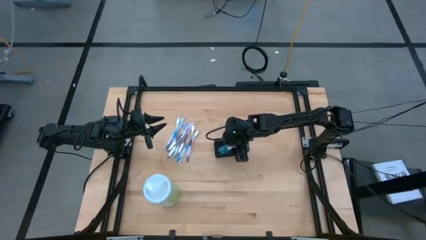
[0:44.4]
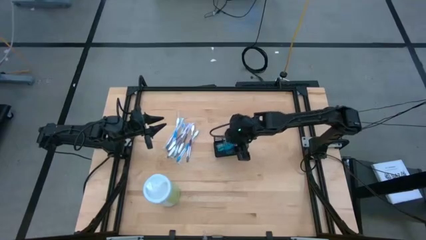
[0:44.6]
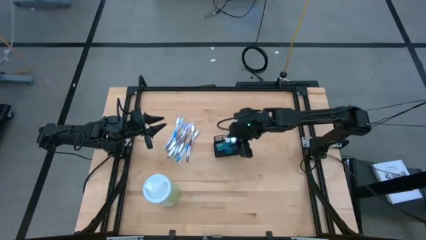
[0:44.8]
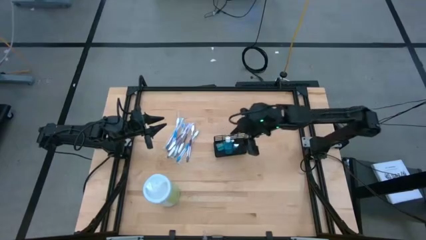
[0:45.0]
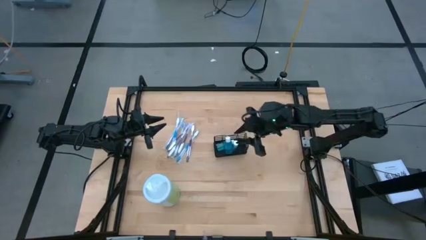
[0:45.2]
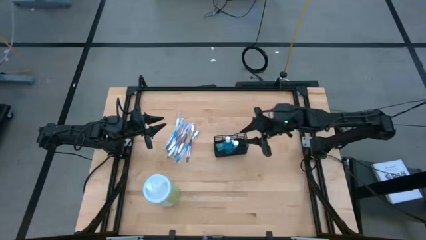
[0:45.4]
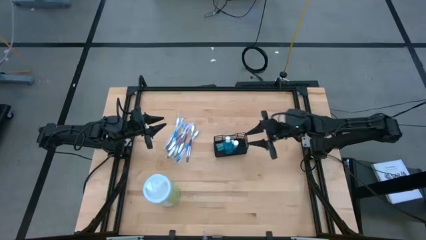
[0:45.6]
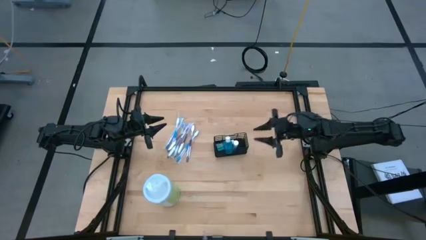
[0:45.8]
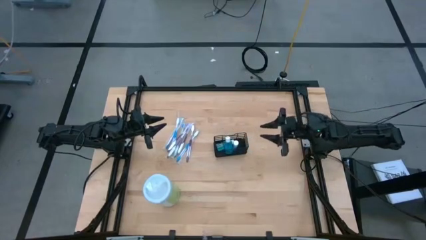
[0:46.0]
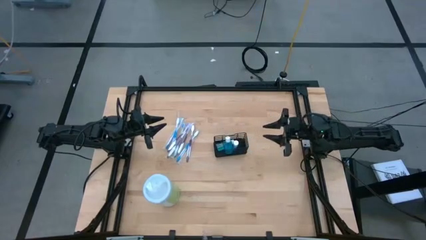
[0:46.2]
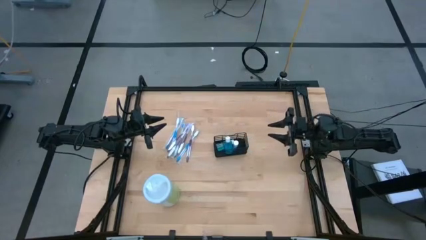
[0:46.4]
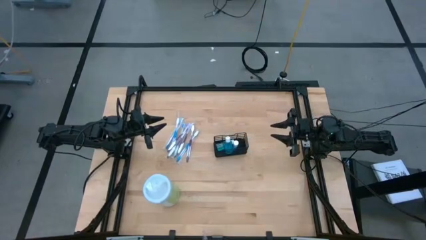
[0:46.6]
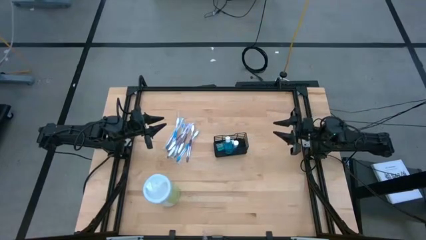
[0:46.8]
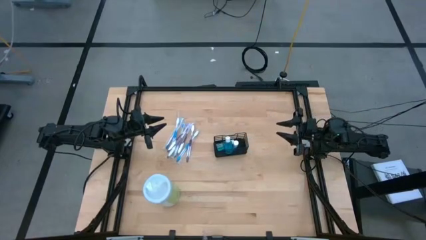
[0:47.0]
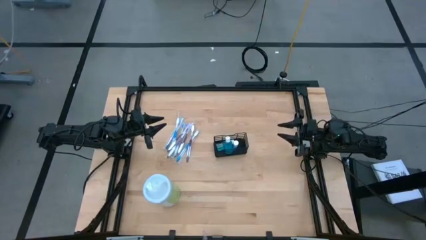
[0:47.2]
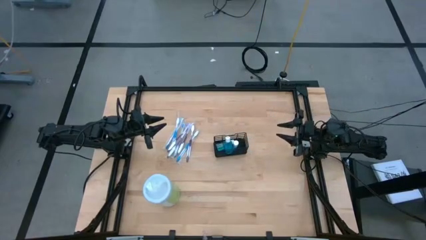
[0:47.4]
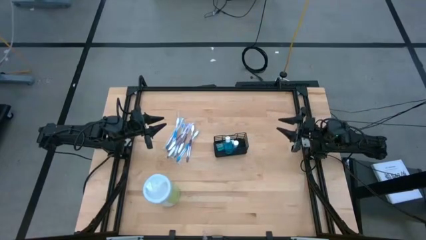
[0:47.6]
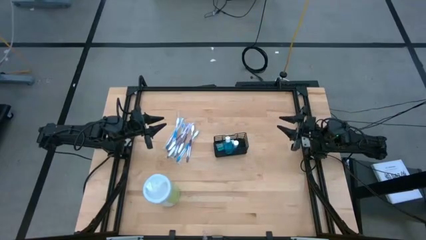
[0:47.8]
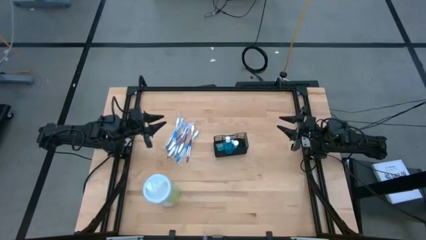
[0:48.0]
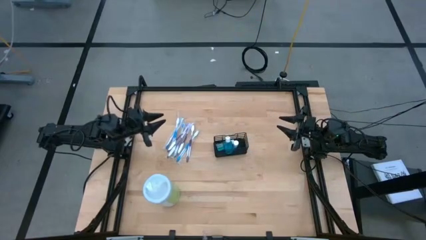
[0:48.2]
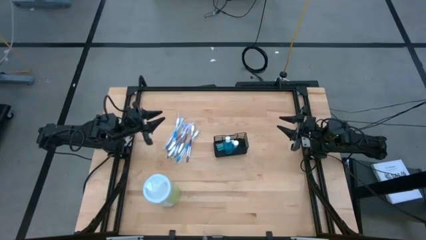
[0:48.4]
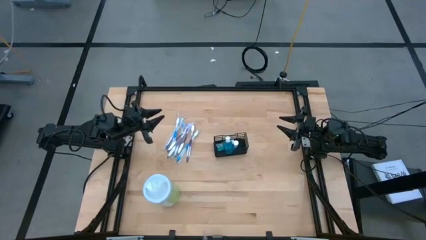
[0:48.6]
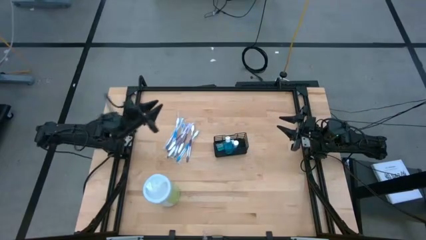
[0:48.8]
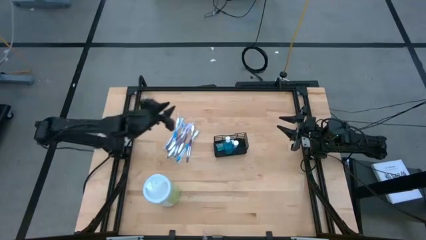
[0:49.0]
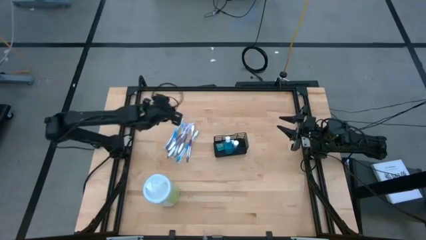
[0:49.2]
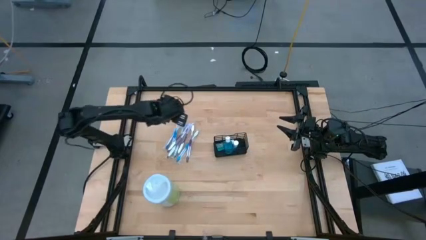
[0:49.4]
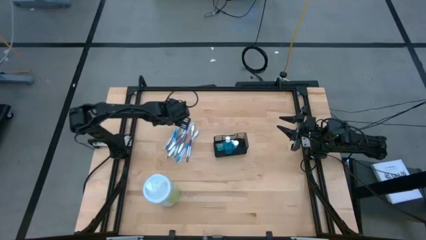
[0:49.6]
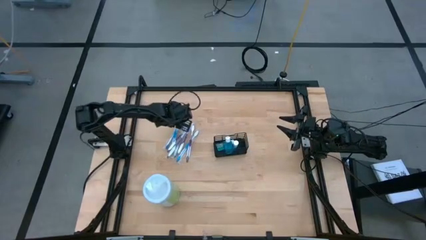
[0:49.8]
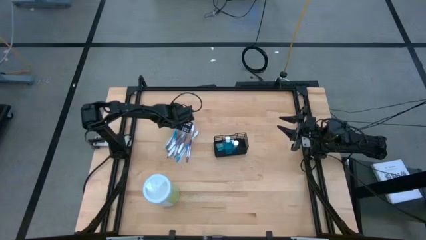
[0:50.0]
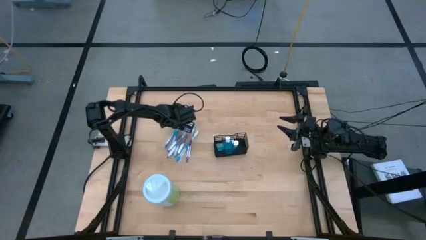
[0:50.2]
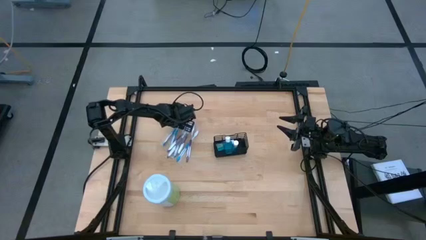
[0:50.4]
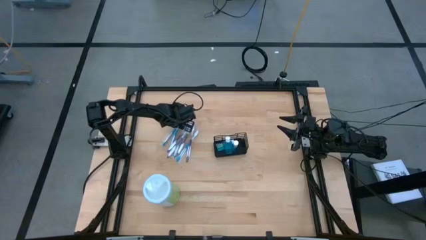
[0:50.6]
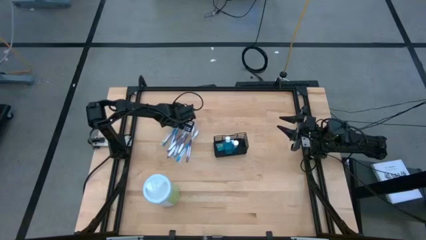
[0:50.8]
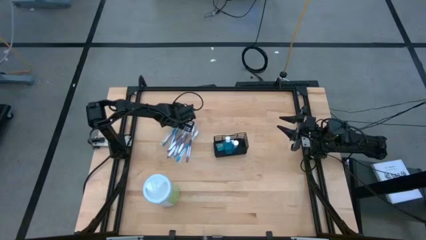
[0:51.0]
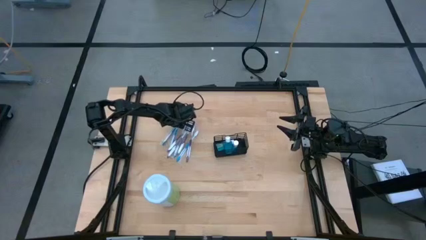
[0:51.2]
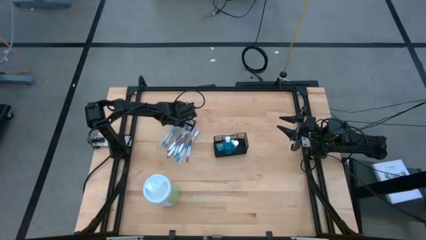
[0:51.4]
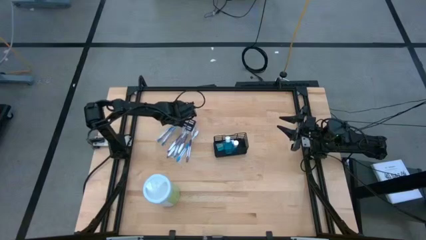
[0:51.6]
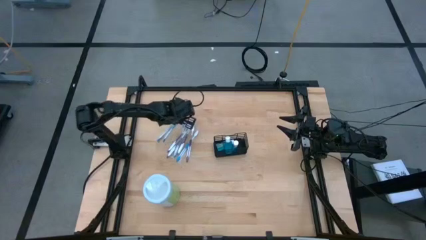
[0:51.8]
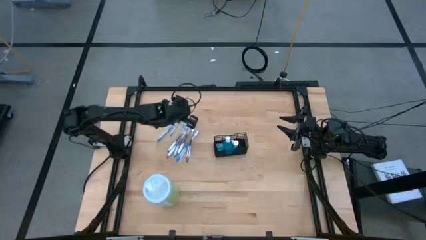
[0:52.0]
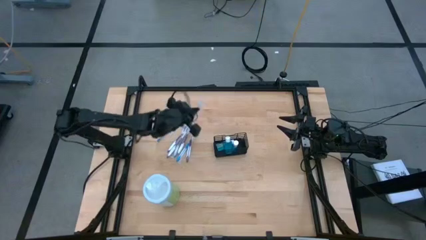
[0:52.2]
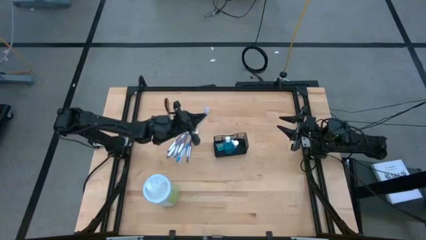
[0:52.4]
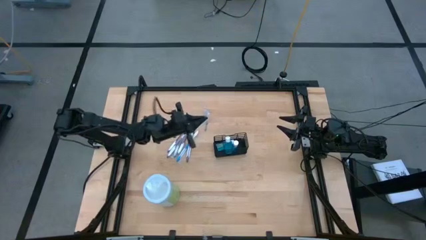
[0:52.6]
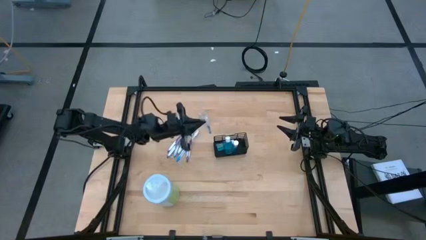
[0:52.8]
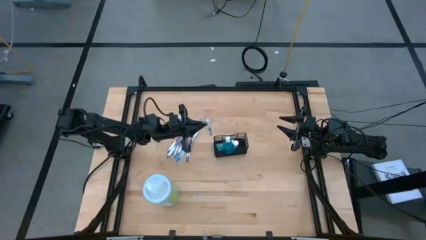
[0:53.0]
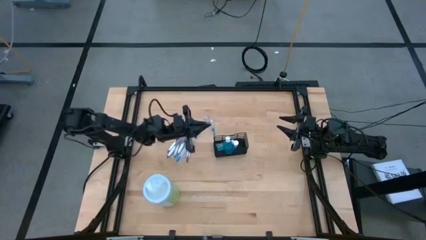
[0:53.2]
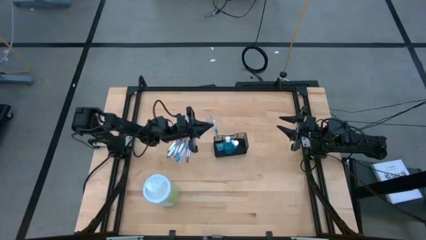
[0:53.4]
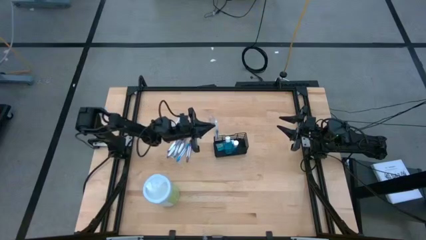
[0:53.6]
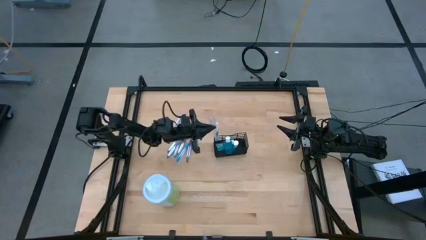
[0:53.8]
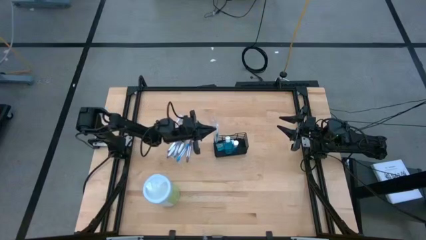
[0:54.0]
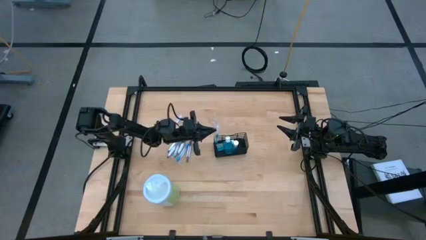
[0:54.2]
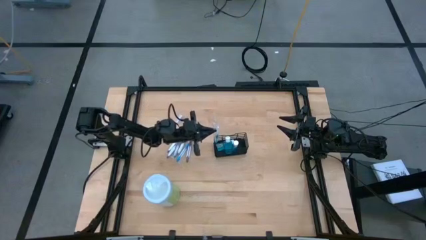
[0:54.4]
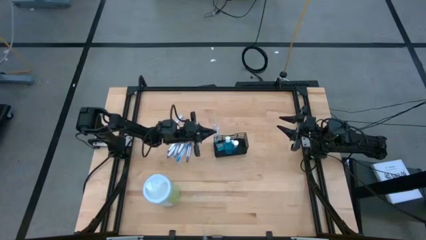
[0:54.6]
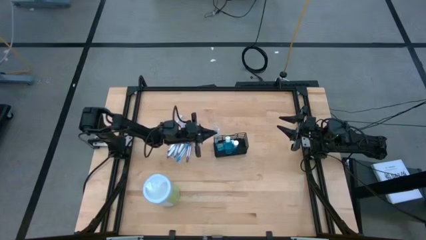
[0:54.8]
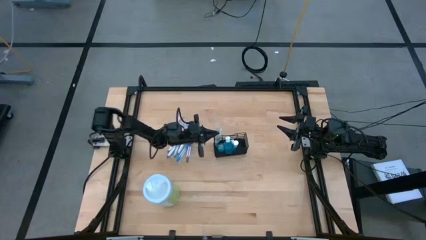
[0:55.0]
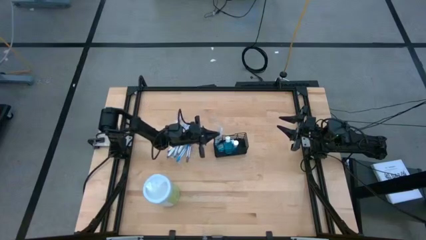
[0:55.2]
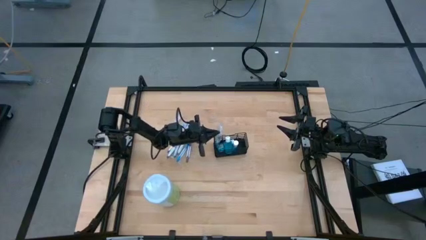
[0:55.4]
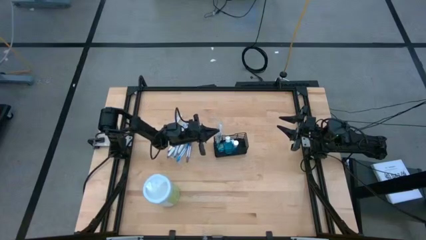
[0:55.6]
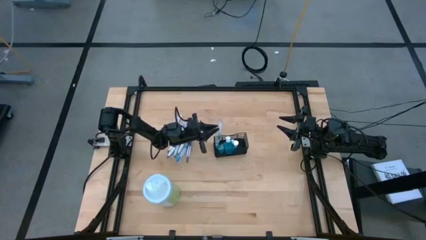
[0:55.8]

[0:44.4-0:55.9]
Task: Pick & Place toothbrushing station
Put the blue toothbrush into the black mesh organizer

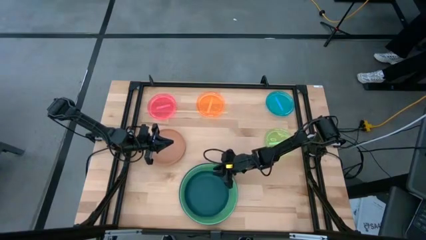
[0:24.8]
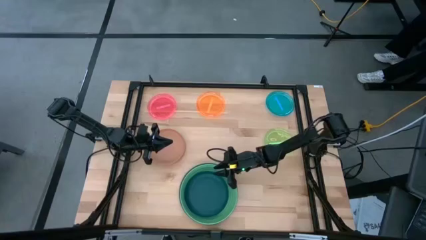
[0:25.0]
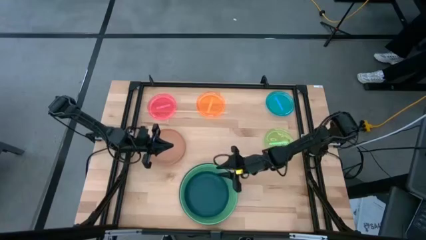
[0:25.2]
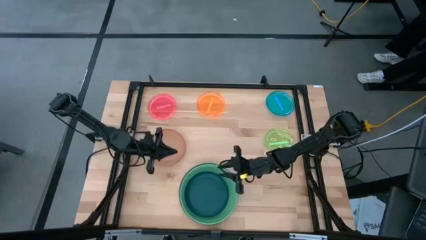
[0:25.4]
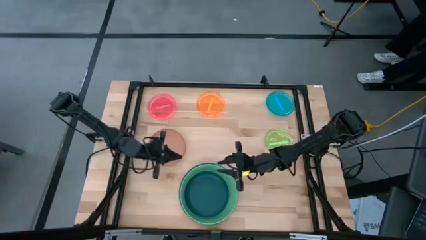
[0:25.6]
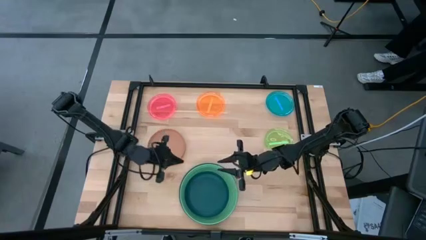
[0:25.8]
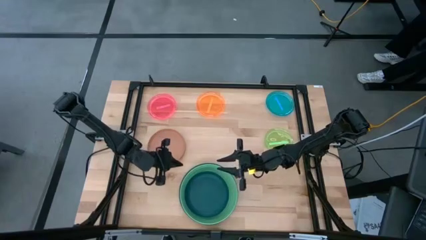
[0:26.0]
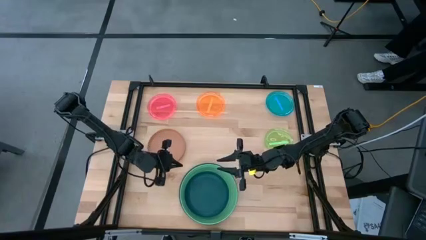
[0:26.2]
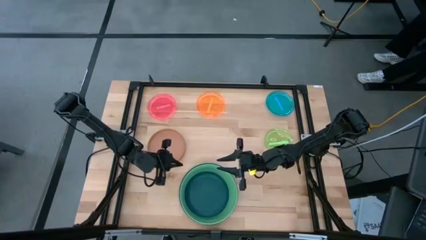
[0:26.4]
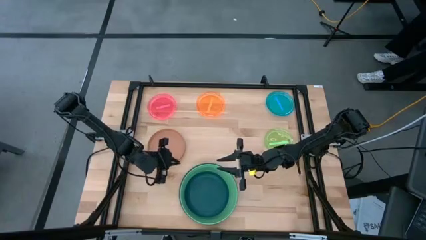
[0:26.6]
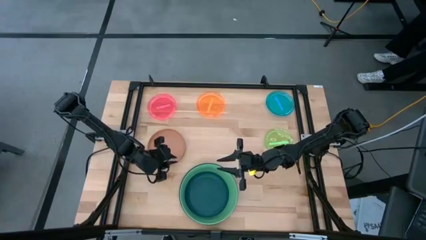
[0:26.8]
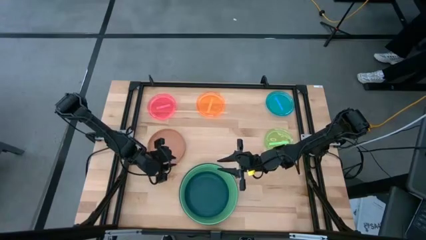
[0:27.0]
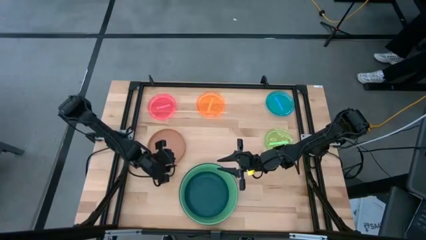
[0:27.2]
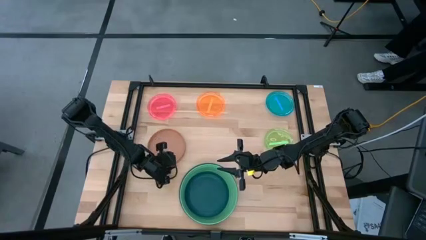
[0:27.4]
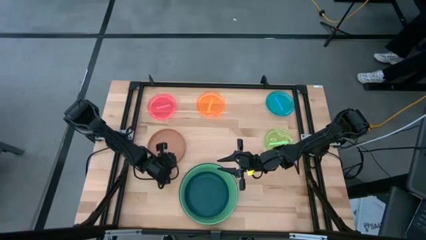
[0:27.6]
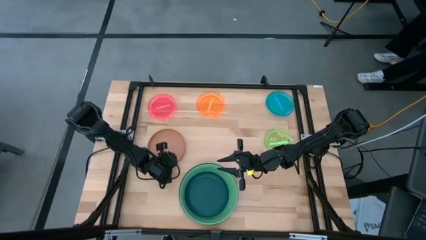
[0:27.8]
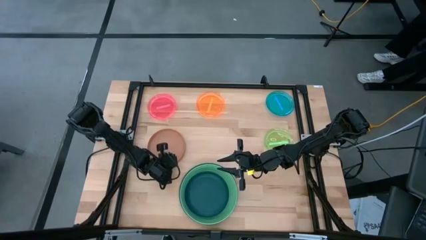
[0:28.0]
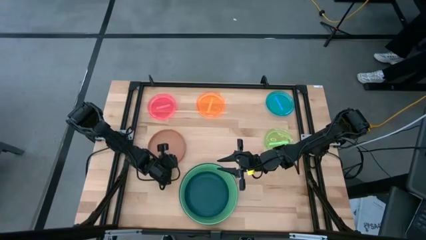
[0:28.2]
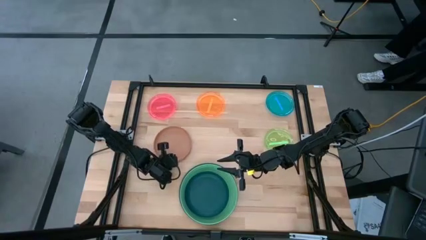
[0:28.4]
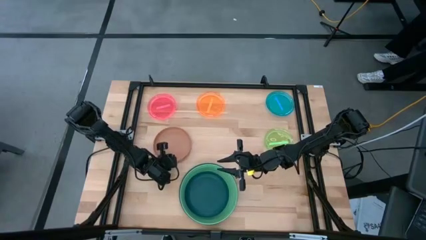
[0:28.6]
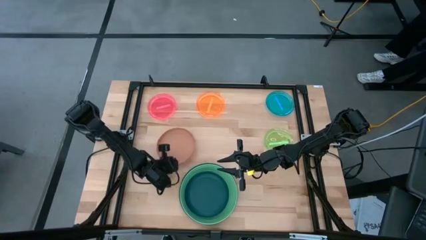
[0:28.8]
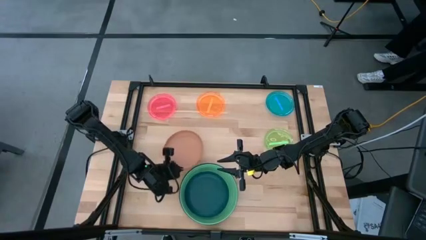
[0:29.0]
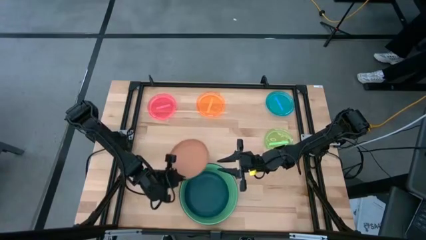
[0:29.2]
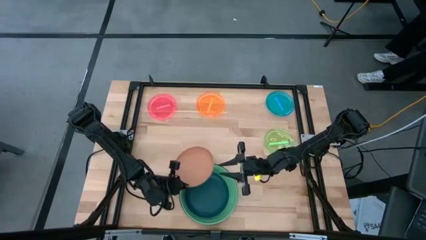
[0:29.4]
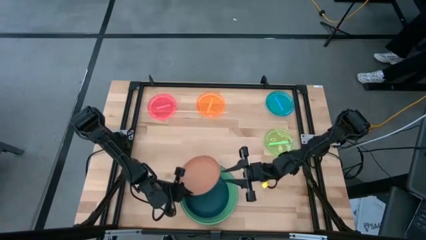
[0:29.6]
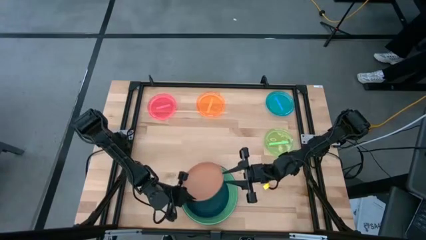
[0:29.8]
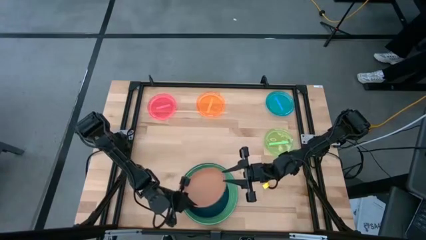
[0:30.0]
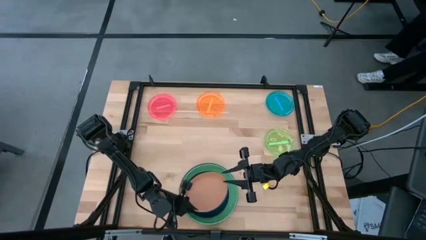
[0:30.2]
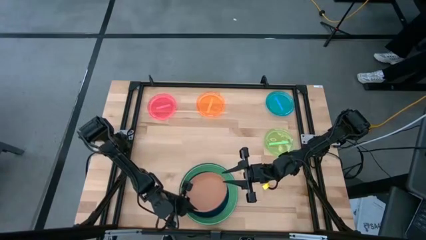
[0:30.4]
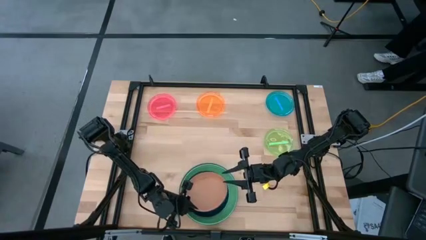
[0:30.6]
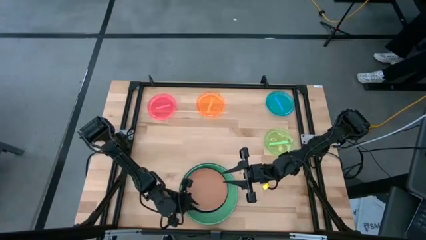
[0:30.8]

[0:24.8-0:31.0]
Task: Stack plastic plates
Stack the brown plate on top of the dark green plate
